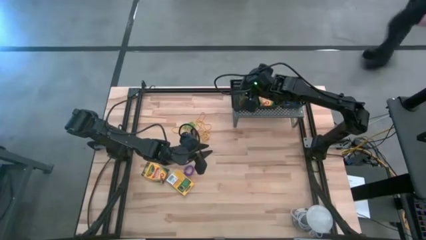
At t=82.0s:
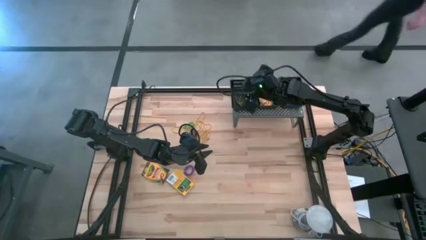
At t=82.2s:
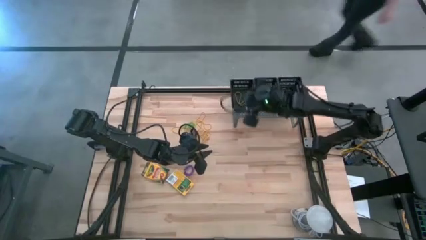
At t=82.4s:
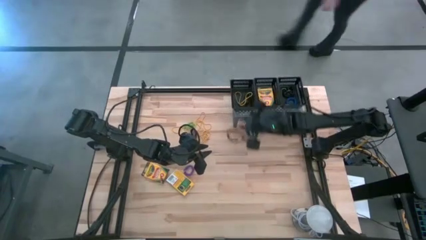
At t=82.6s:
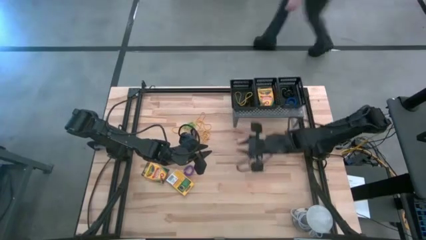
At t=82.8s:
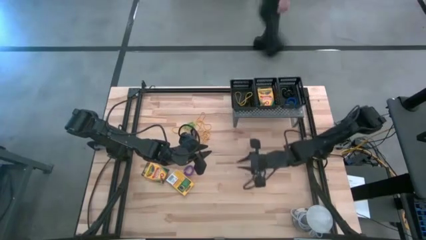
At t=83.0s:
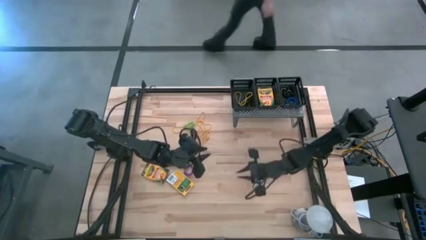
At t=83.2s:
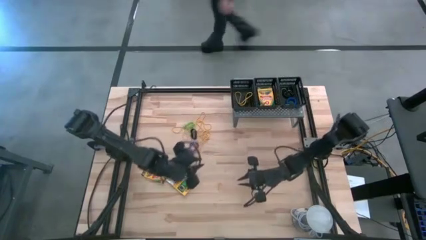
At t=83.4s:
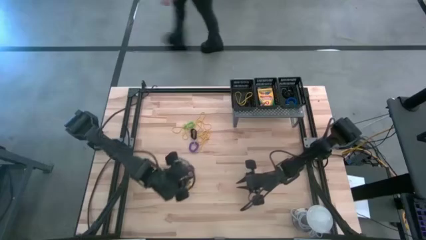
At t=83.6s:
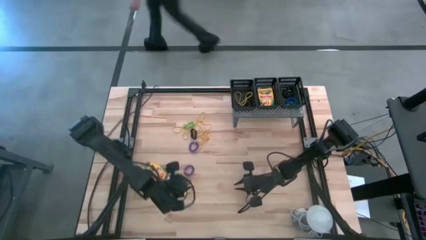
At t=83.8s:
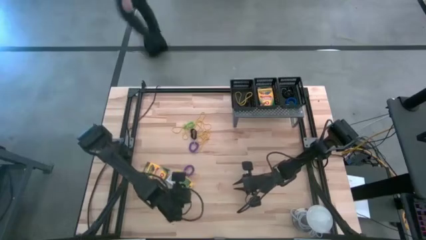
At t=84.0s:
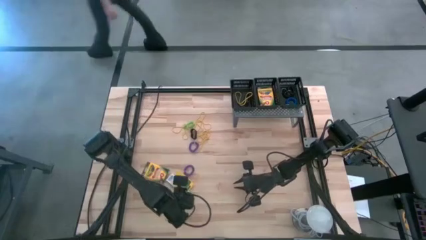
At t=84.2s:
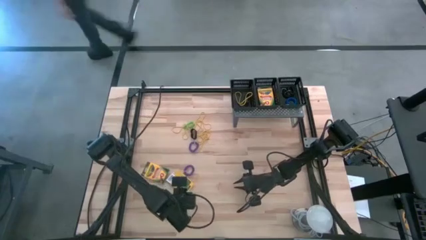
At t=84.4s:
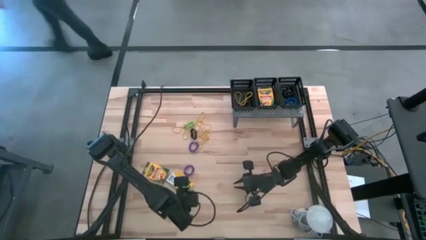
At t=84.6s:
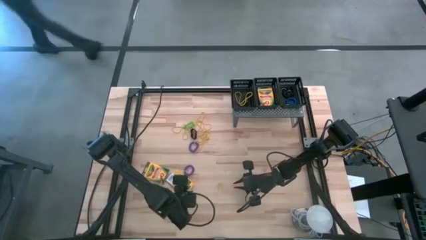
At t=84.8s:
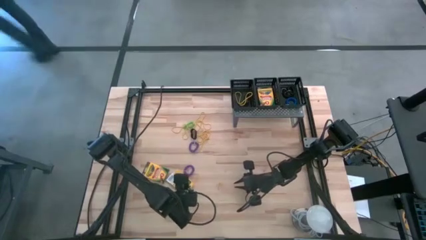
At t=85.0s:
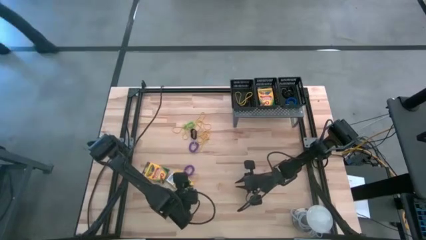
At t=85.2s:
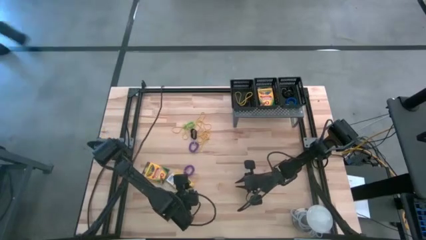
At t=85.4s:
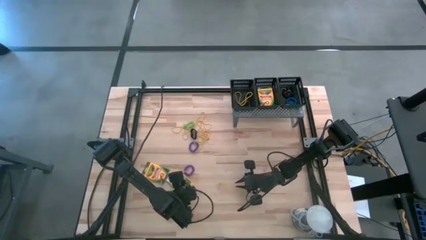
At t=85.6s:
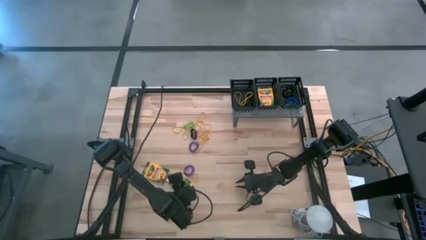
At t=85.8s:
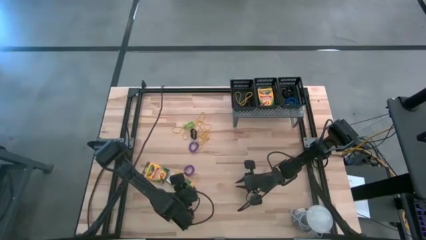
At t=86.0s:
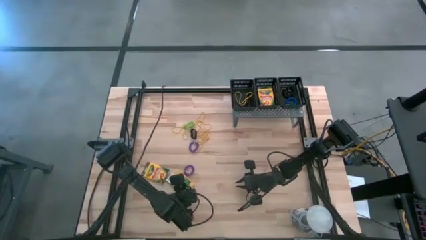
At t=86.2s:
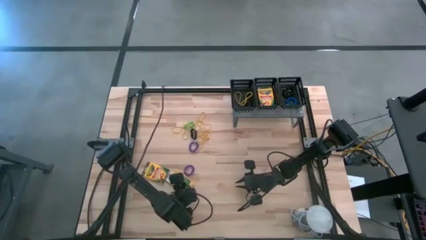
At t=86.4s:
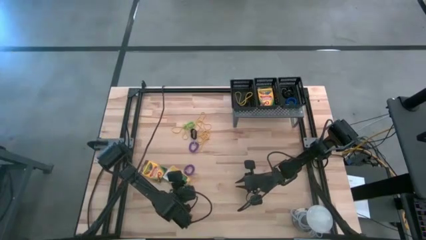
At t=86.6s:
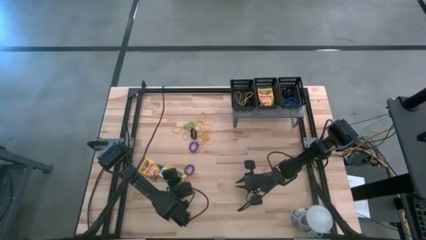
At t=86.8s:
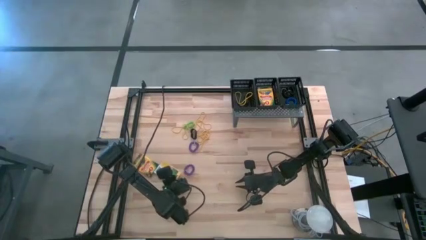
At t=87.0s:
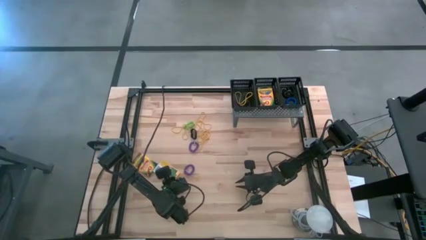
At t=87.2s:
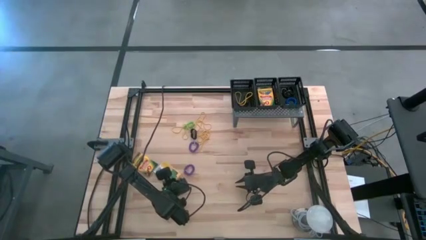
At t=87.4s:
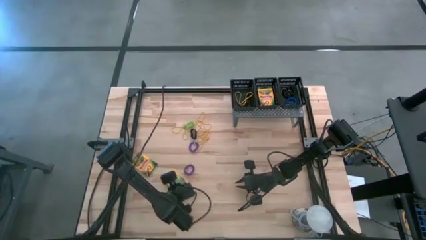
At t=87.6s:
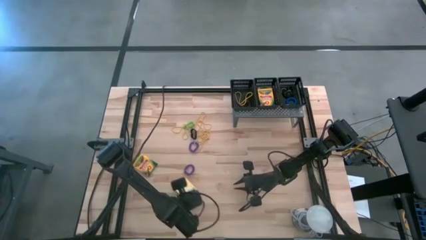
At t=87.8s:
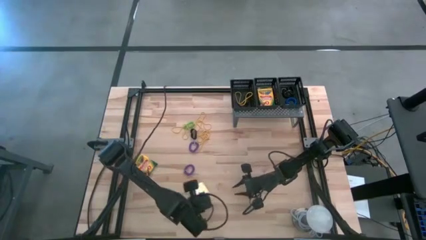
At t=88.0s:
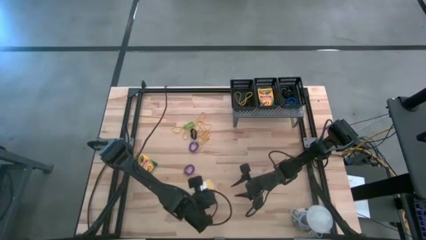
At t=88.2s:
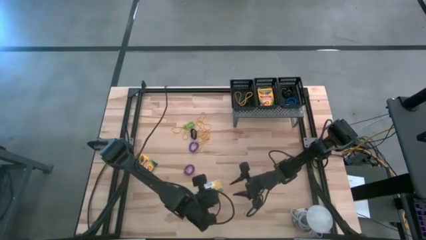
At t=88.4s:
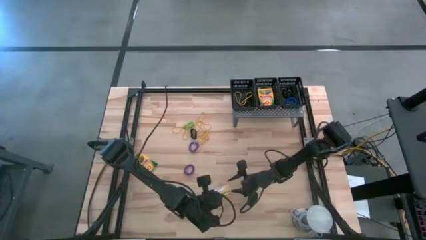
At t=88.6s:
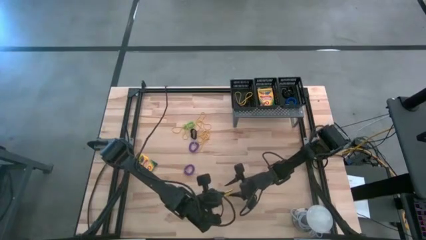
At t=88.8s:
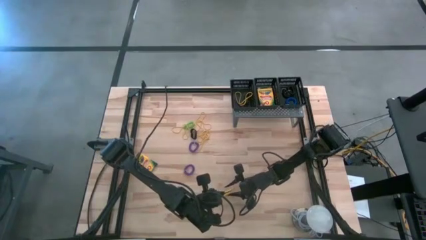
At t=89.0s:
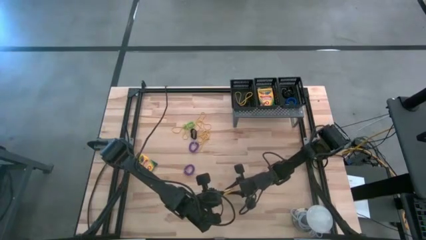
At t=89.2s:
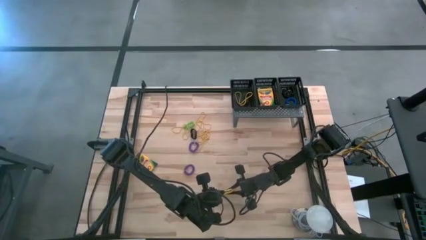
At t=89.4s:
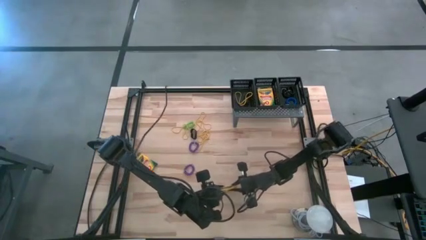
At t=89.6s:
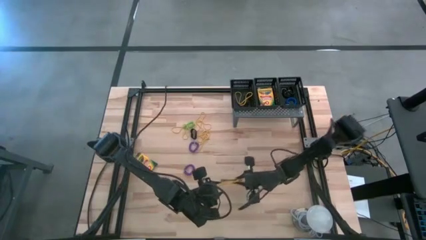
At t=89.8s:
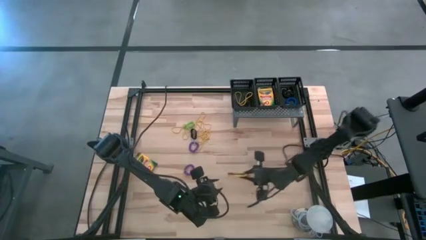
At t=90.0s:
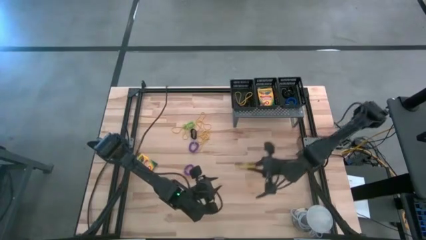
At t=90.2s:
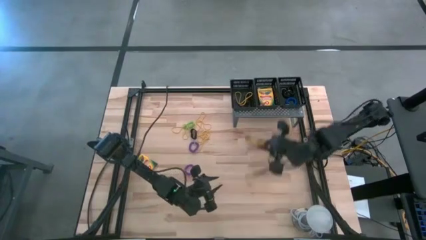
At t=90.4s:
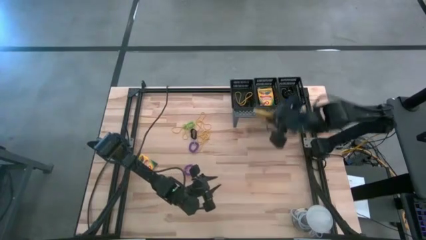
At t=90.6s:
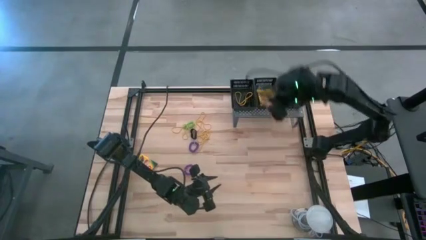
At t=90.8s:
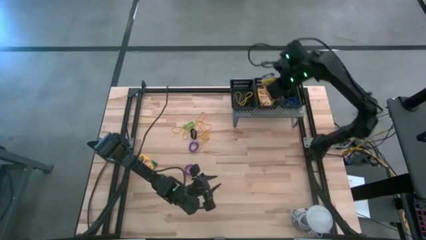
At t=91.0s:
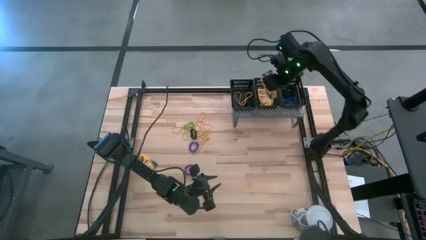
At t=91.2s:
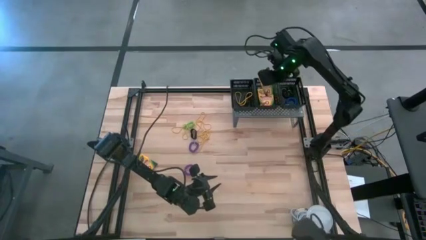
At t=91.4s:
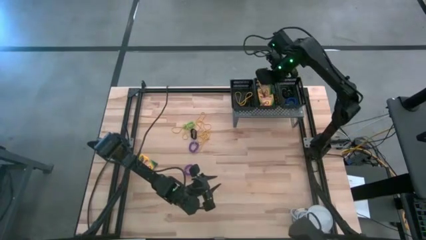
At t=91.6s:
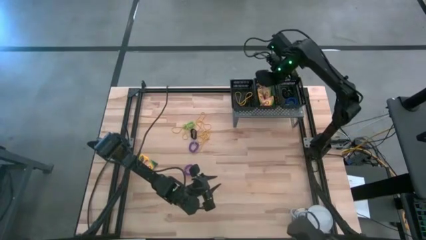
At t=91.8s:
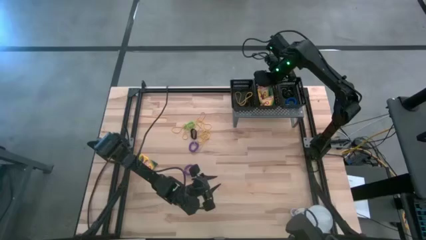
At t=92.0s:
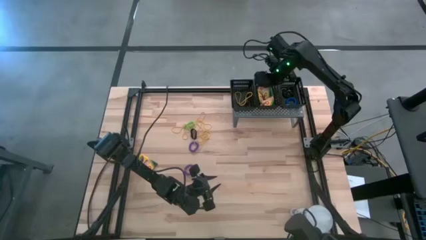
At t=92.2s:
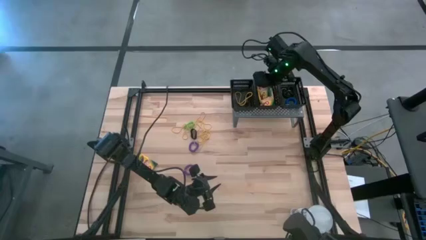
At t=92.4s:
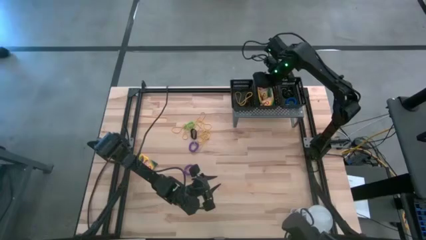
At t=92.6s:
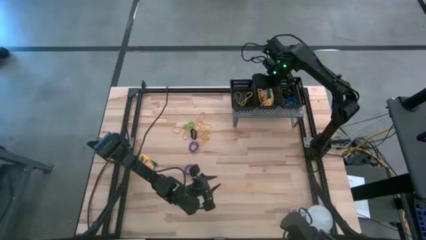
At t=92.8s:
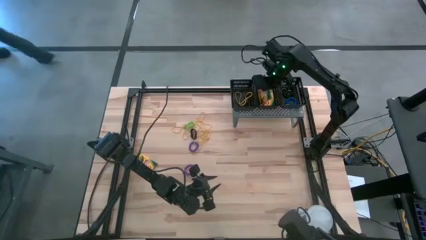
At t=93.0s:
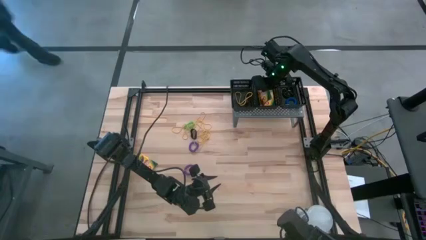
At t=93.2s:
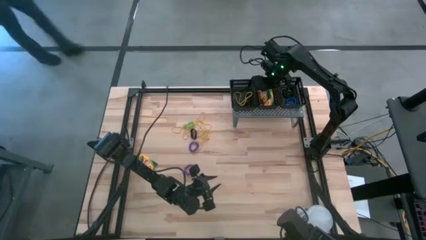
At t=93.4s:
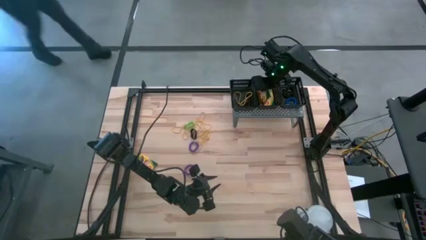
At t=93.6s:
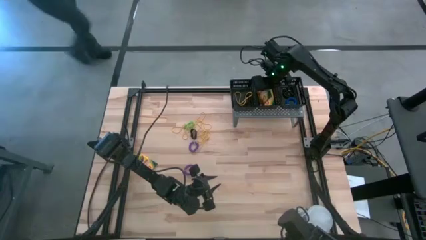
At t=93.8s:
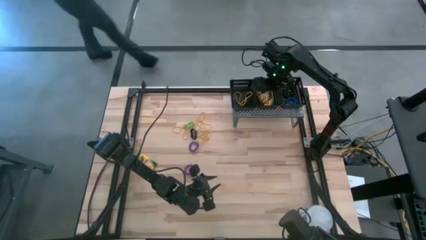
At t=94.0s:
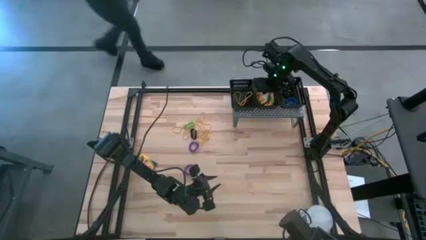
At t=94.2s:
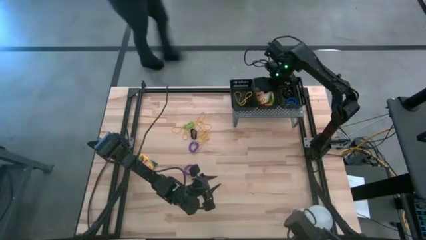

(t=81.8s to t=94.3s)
Task: Pick & Place Office Desk Supplies
Put the yellow crayon box into the middle black basket on the shelf

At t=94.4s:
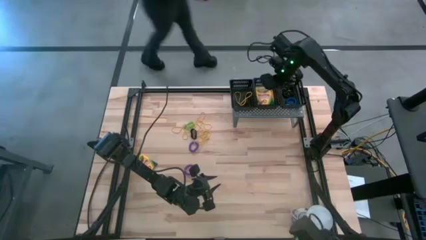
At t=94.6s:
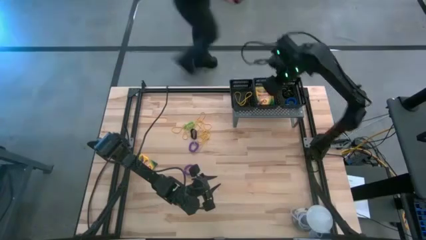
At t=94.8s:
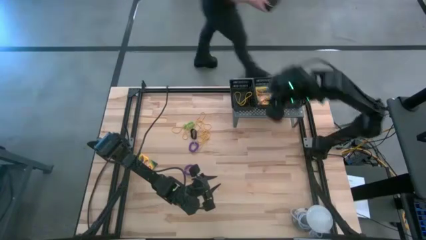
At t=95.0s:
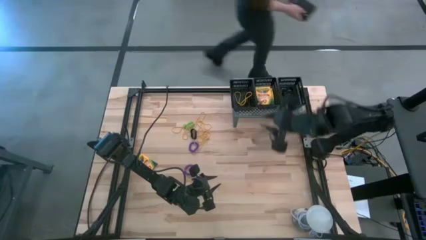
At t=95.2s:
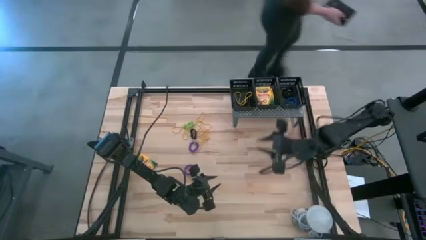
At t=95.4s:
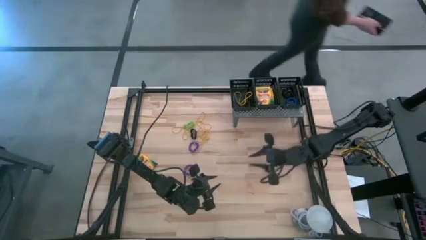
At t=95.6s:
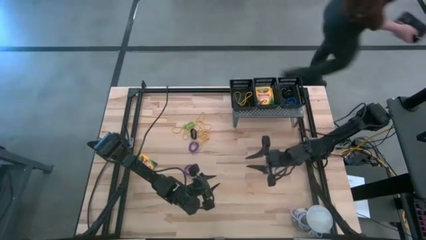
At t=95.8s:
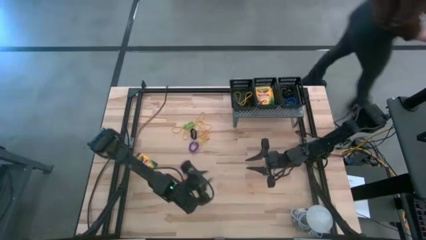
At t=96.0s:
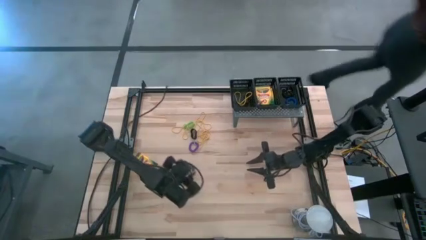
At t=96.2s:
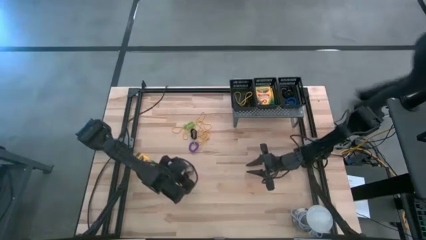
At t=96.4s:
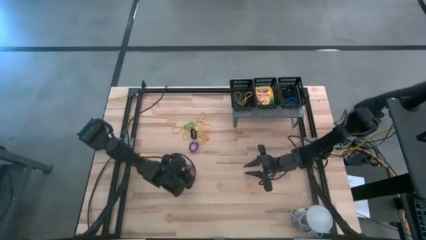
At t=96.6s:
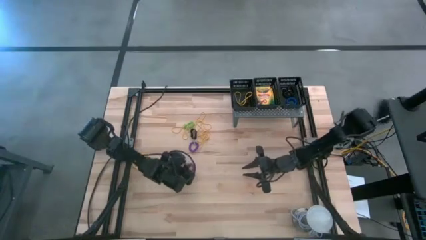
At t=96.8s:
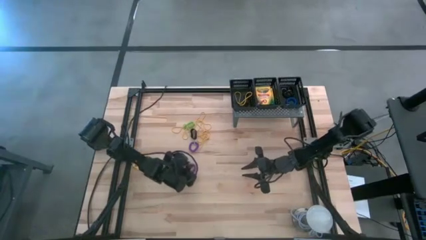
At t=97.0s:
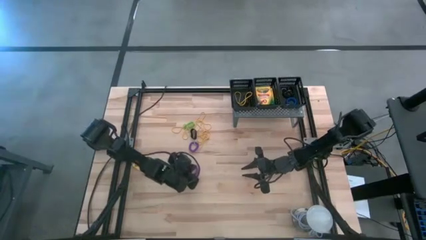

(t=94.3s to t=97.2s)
Put the purple spring keychain into the right black basket on the shelf
